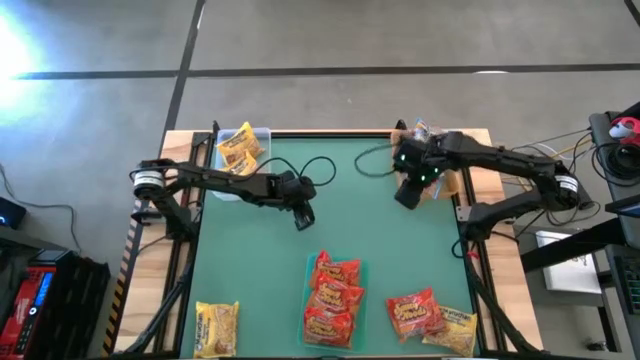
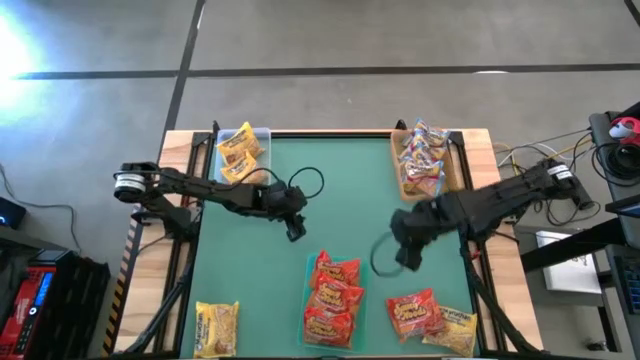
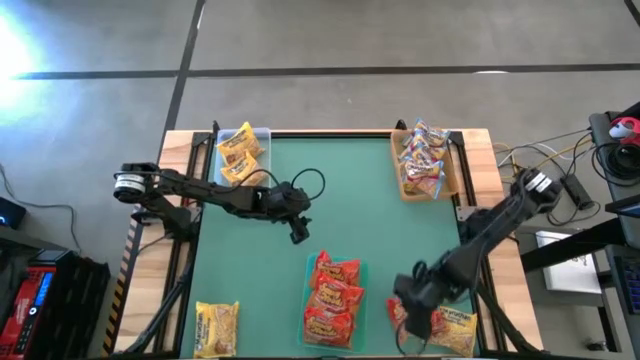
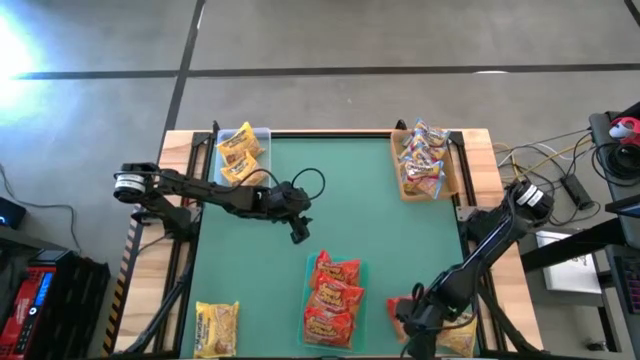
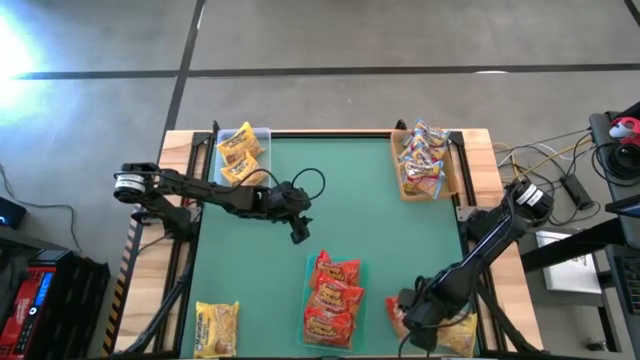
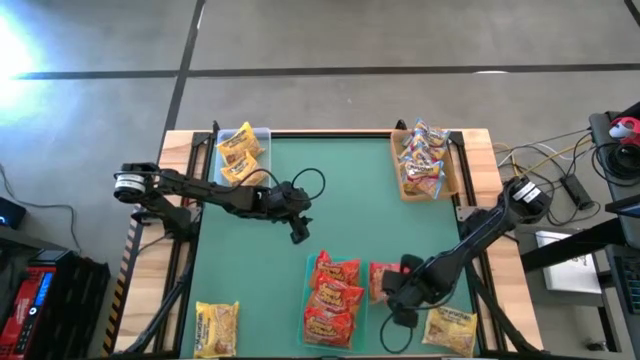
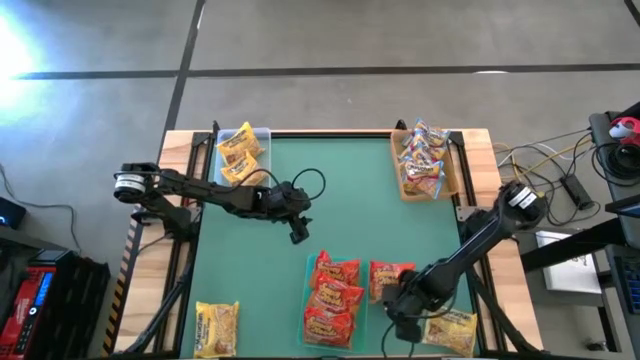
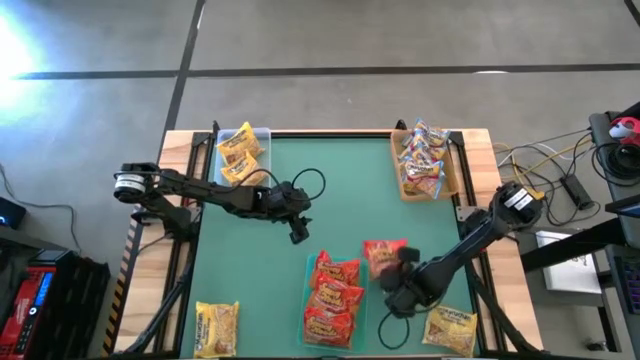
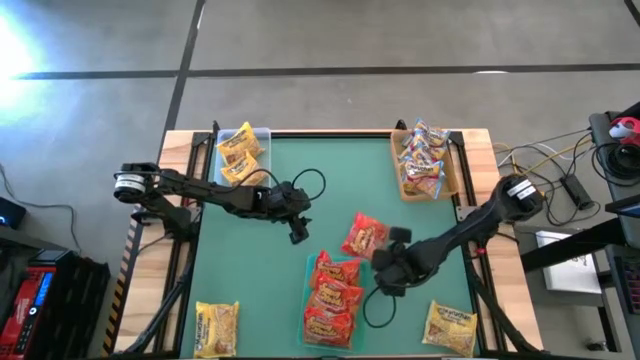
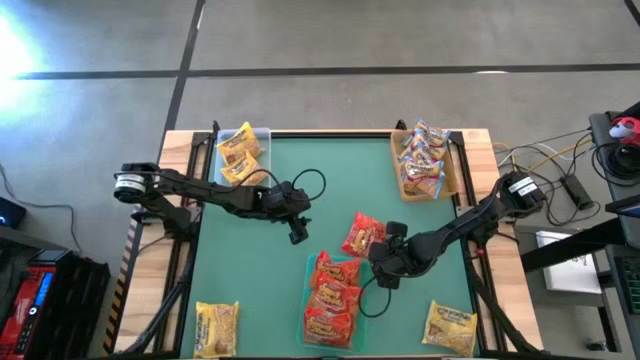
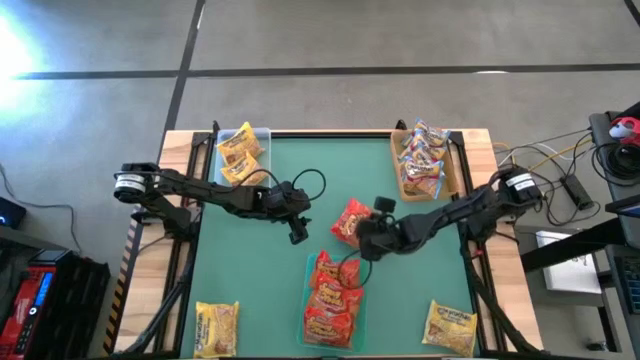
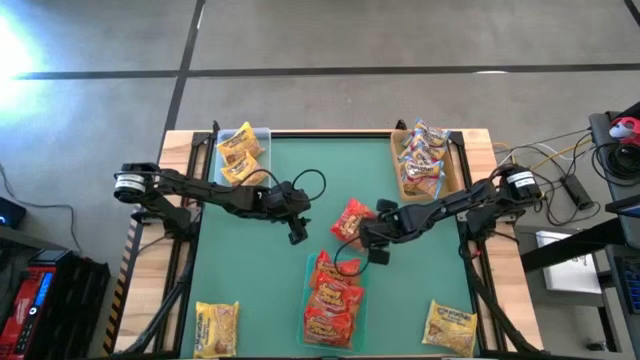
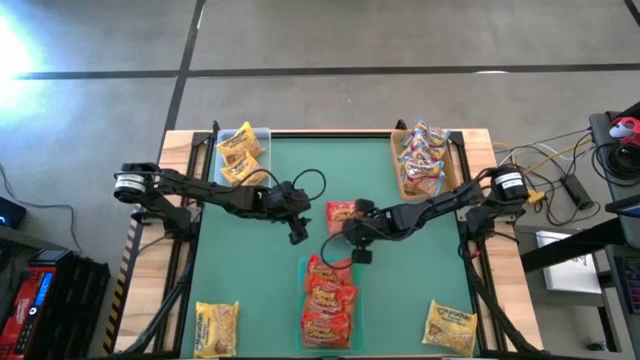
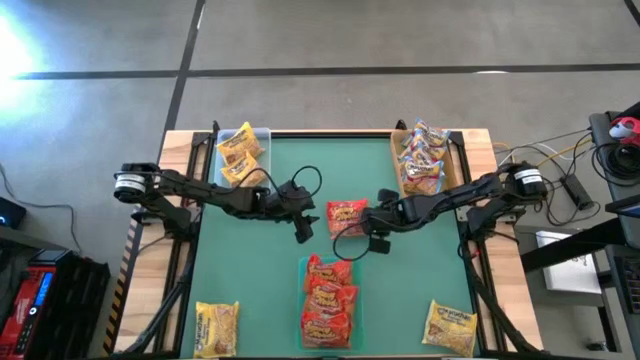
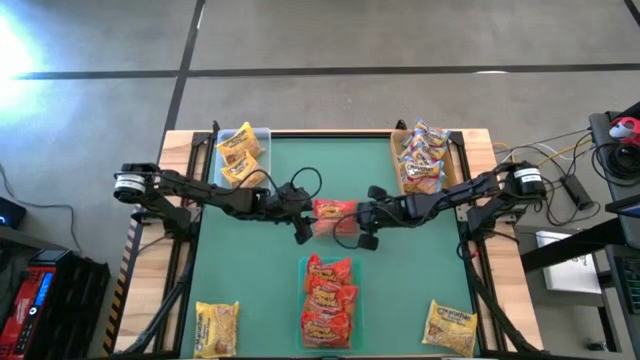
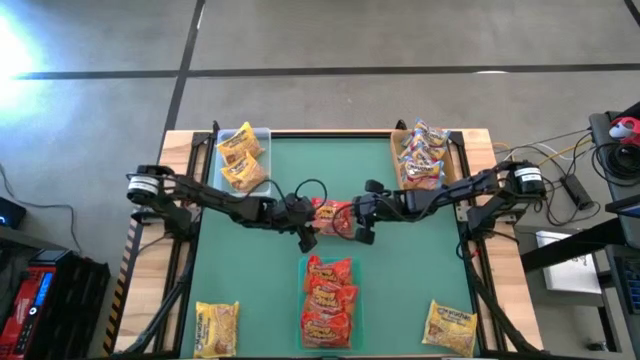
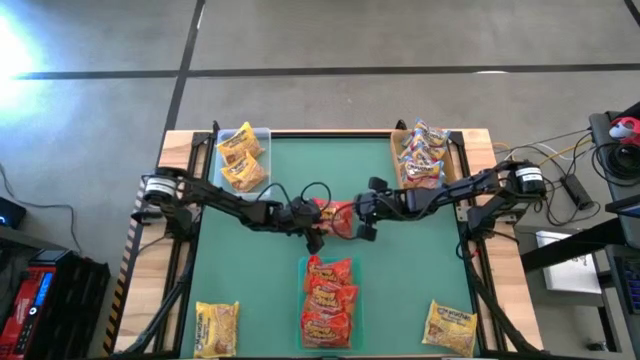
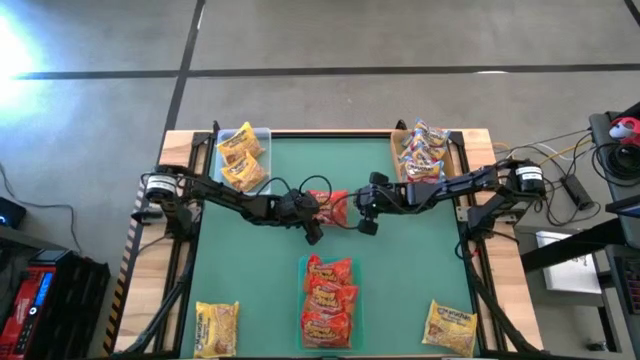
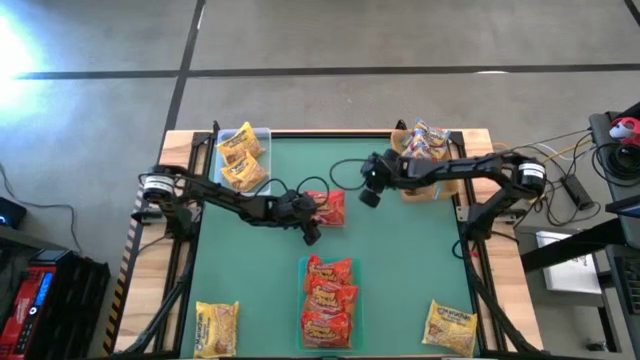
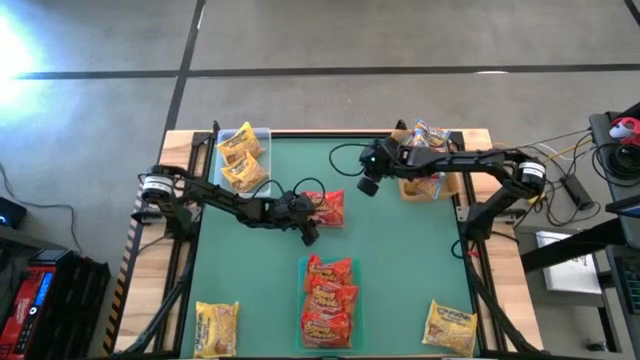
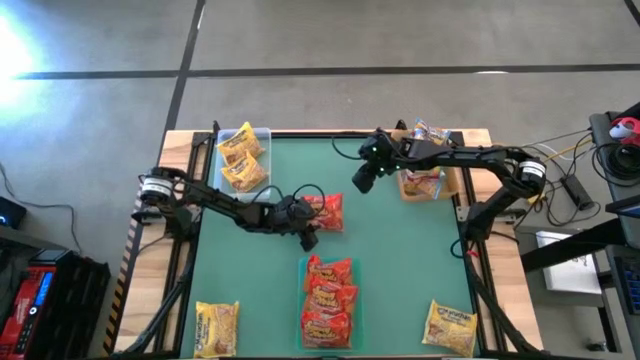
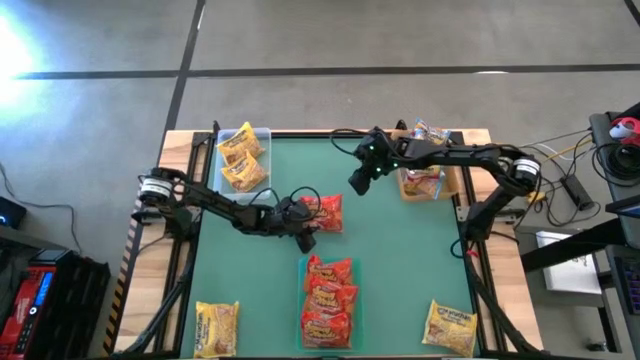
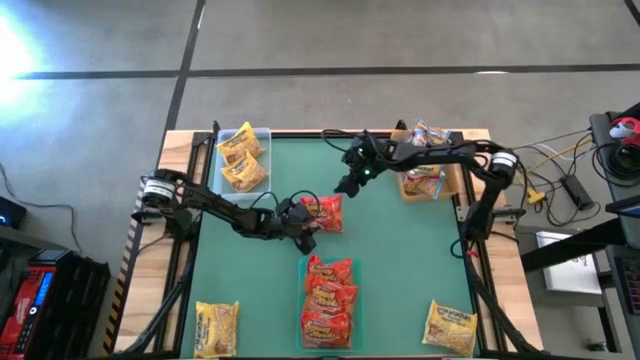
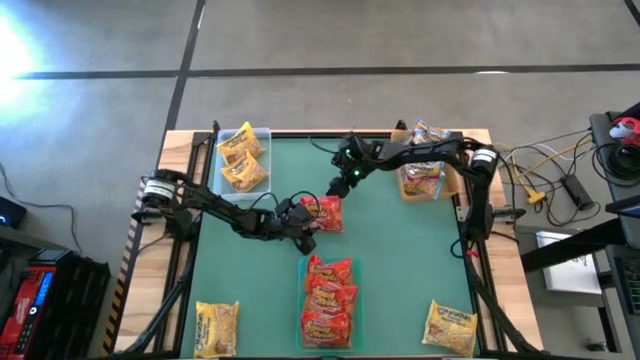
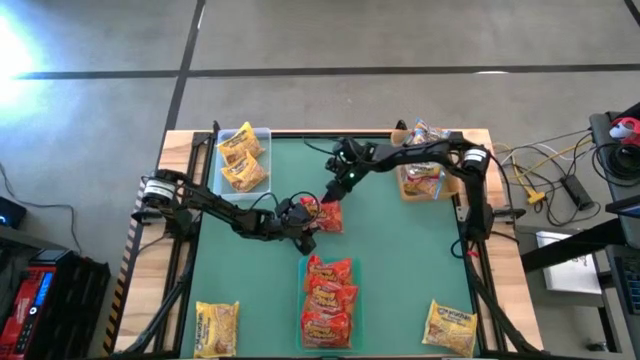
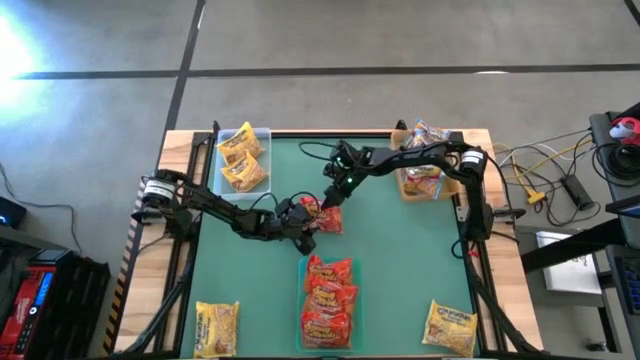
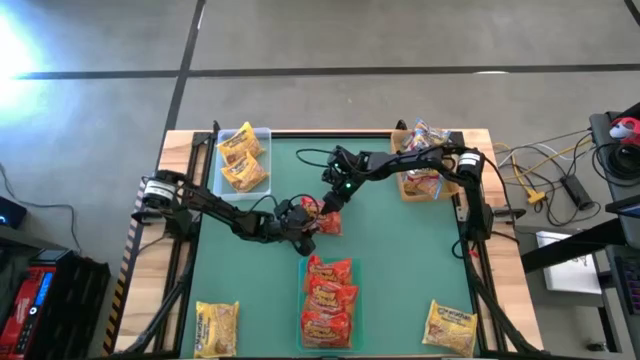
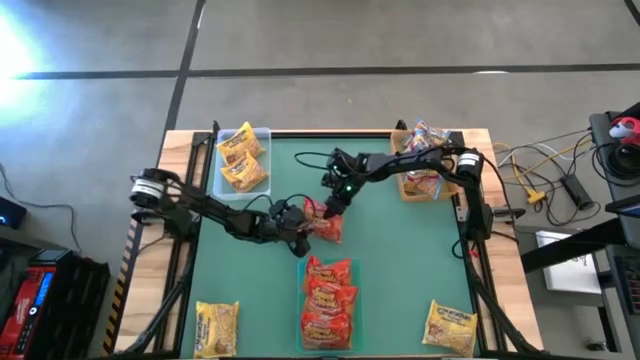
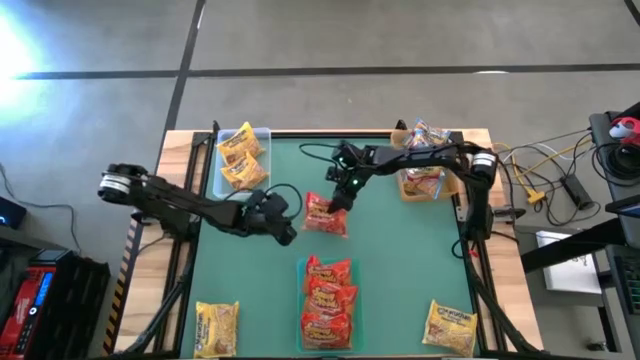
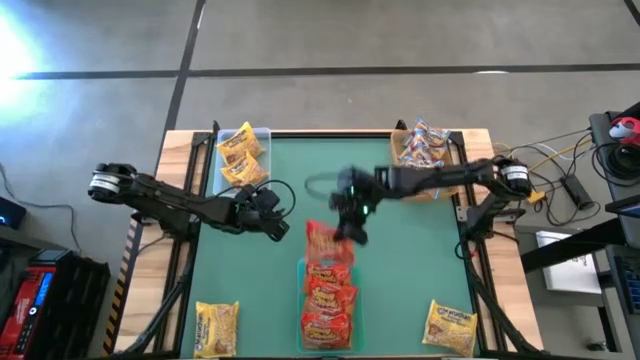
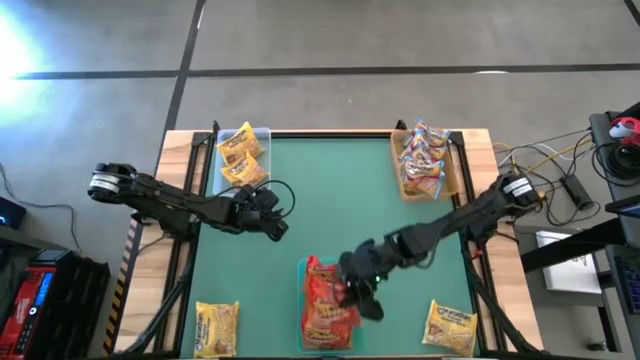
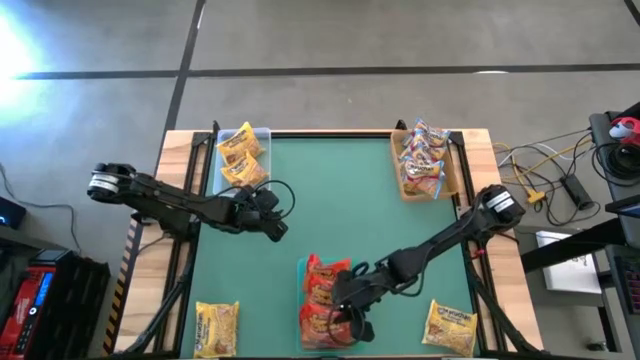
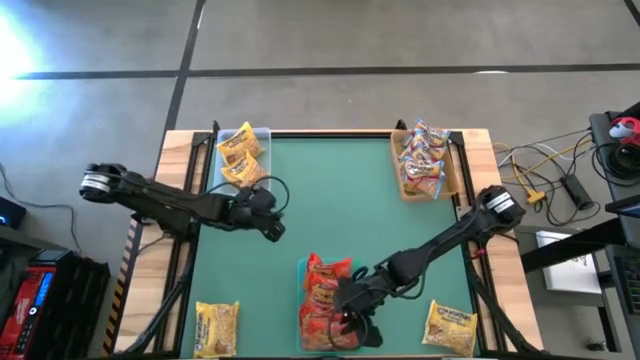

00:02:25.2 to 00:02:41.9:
Task: Sort Maruchan noodles
Put the red noodle pack into the green bin

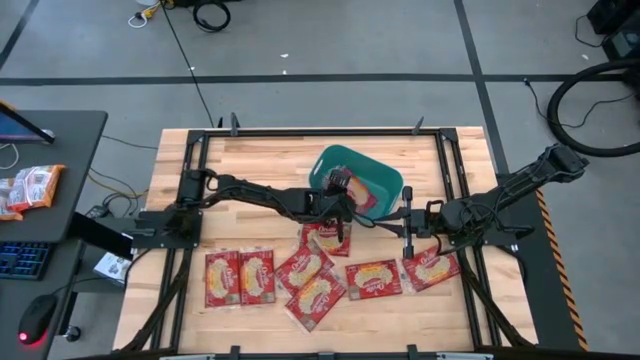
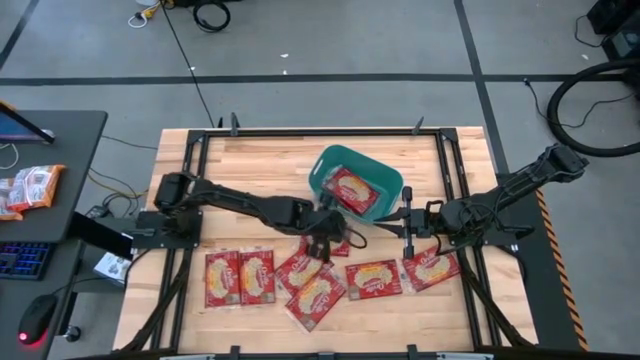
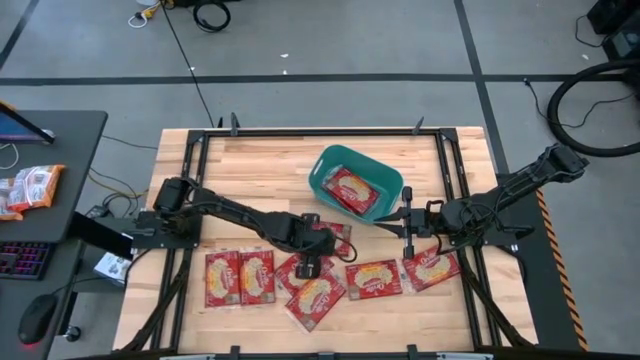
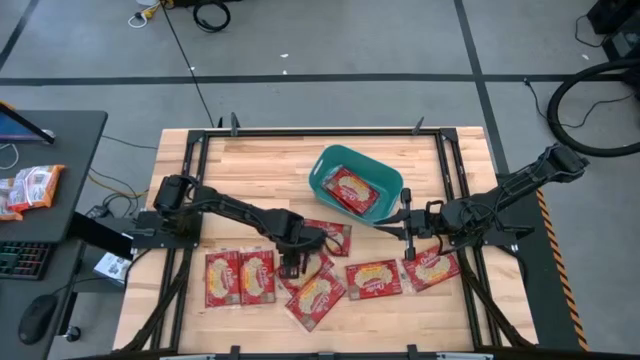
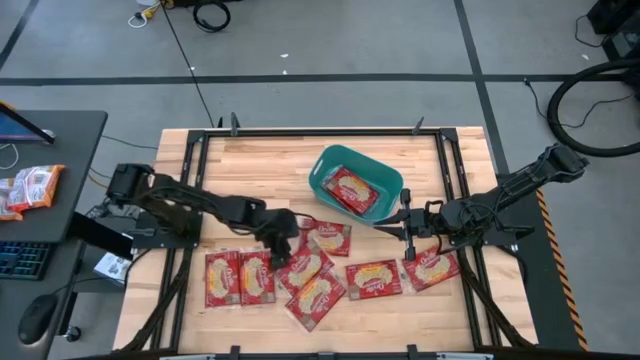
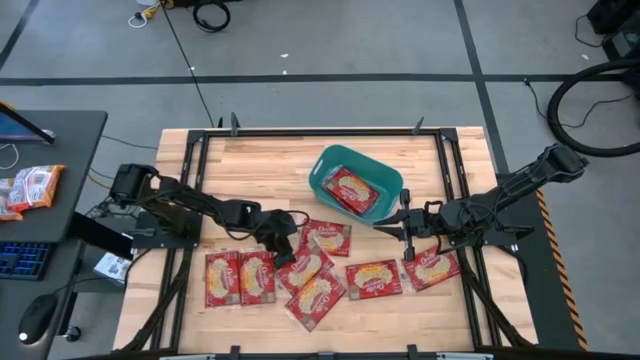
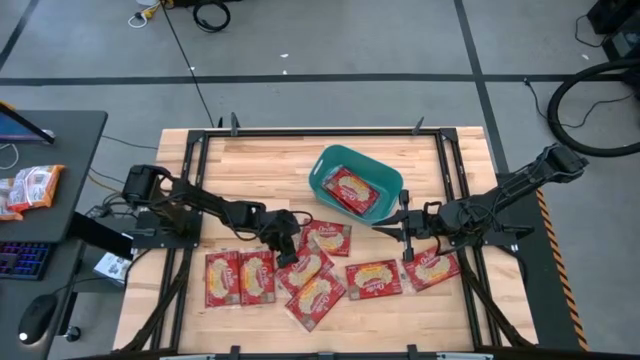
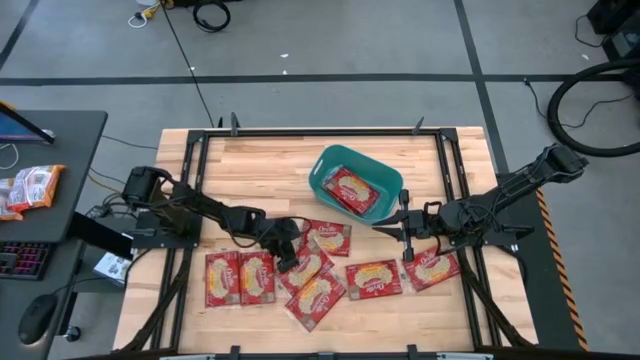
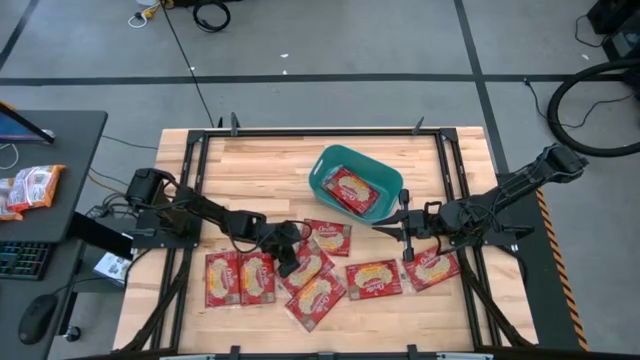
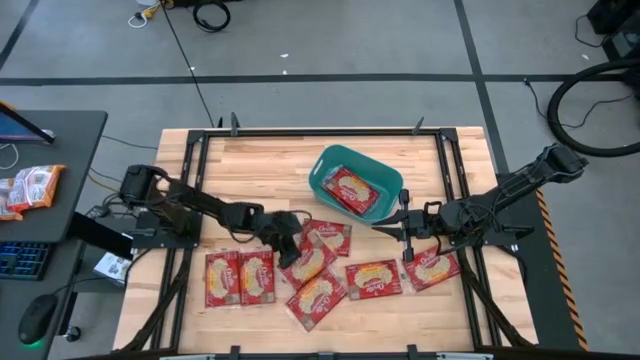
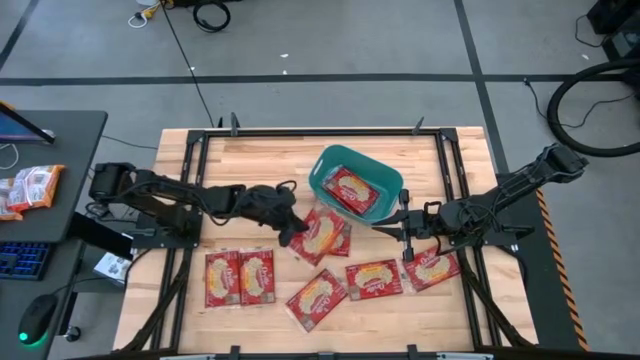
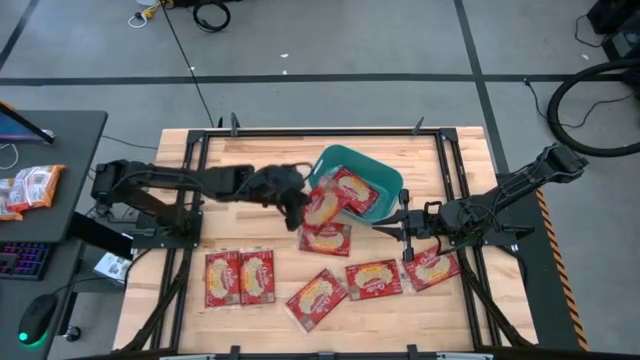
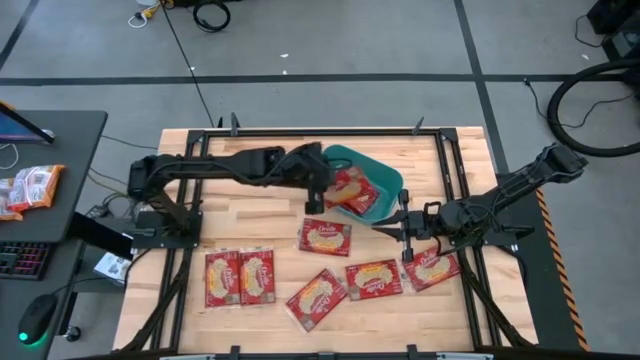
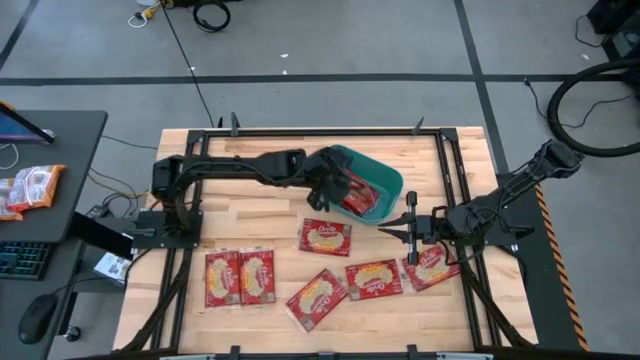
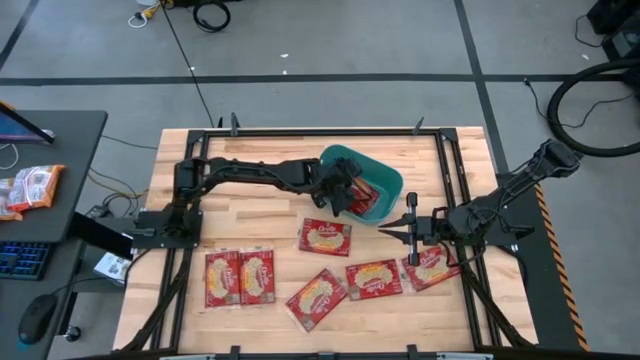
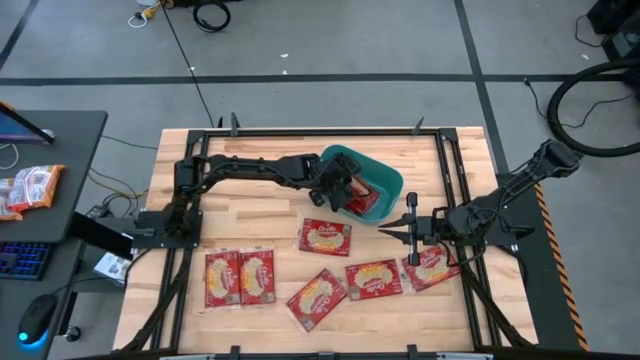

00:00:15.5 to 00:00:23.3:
Task: Sort popcorn bags into baskets
Put the red popcorn bag into the green bin
